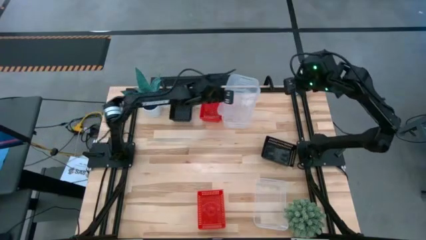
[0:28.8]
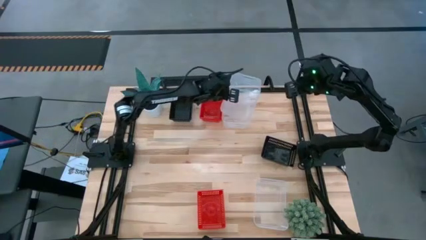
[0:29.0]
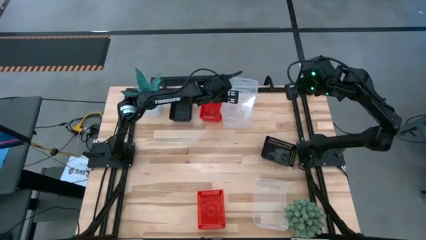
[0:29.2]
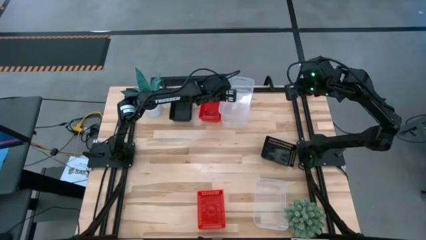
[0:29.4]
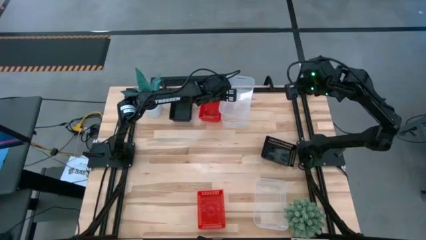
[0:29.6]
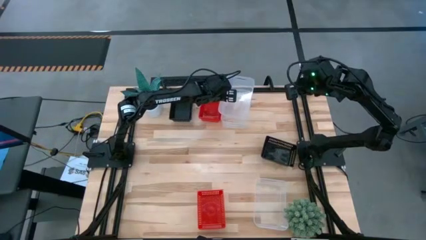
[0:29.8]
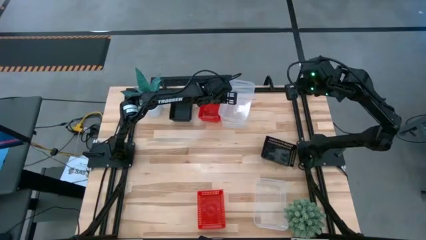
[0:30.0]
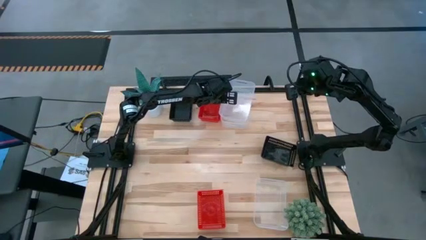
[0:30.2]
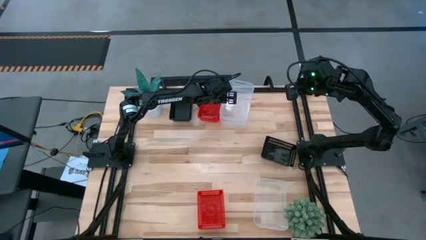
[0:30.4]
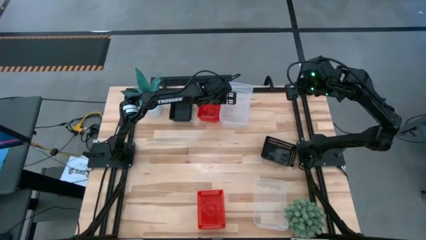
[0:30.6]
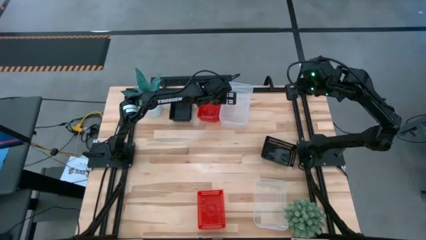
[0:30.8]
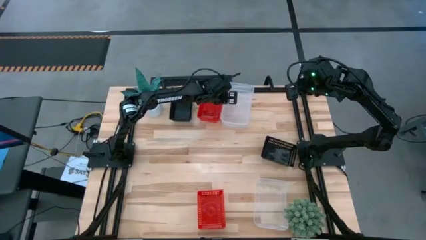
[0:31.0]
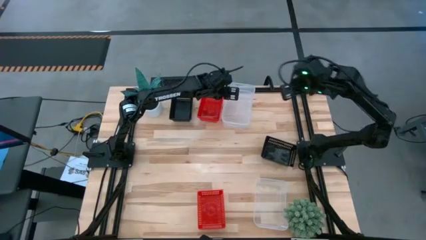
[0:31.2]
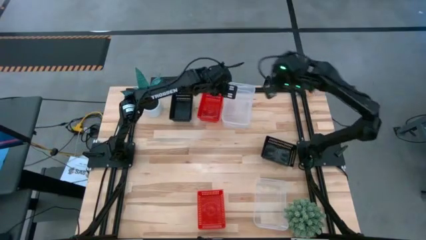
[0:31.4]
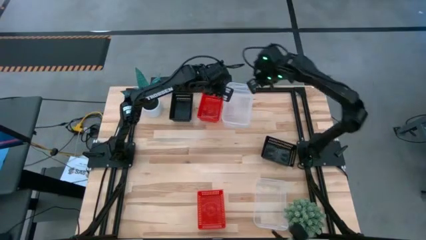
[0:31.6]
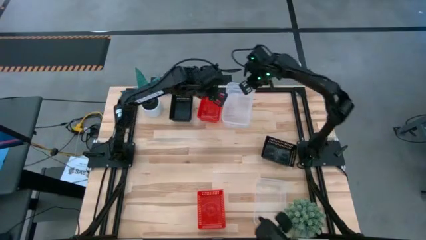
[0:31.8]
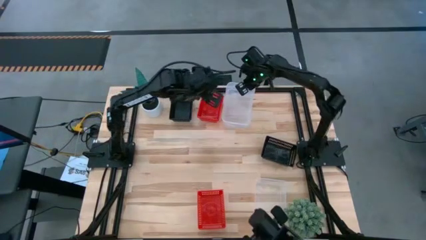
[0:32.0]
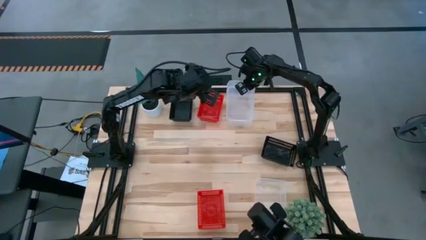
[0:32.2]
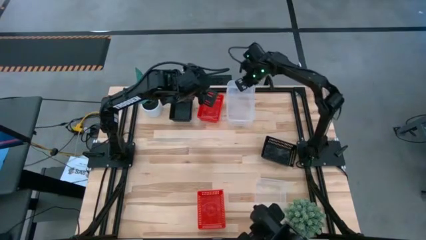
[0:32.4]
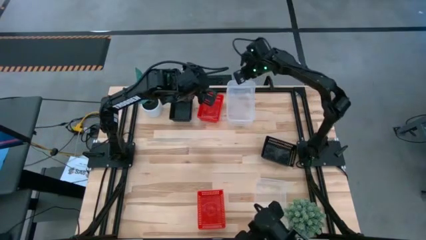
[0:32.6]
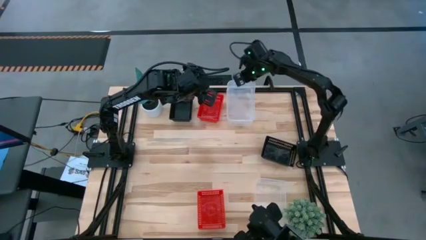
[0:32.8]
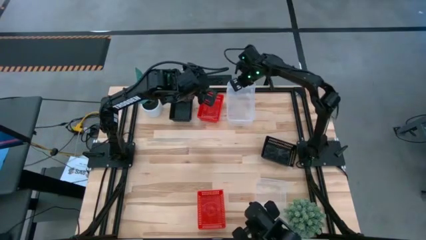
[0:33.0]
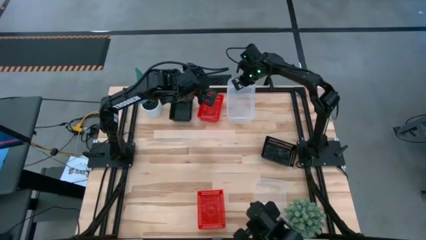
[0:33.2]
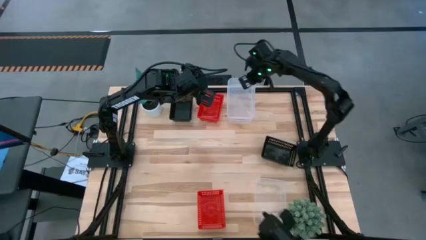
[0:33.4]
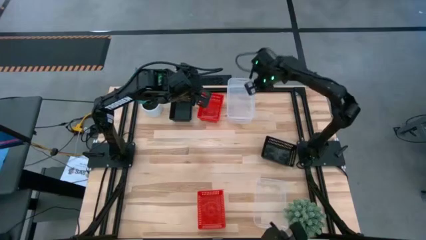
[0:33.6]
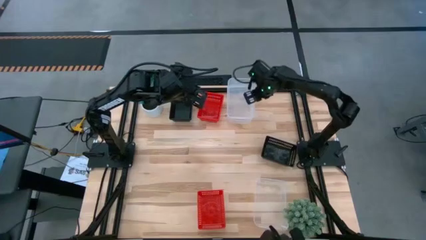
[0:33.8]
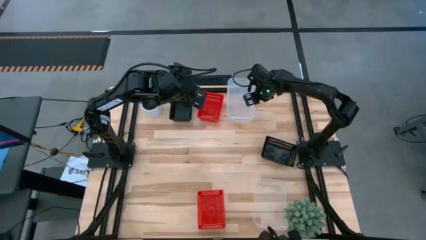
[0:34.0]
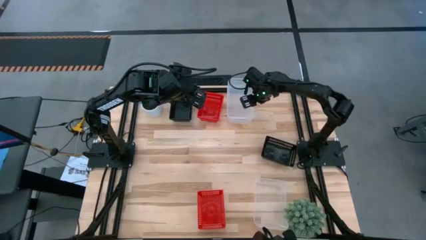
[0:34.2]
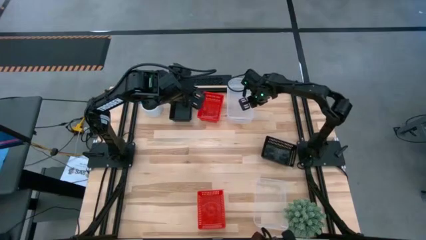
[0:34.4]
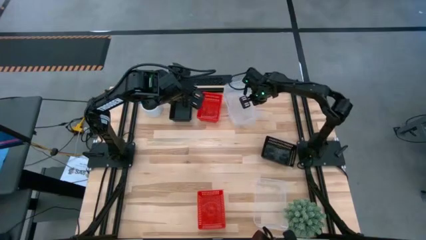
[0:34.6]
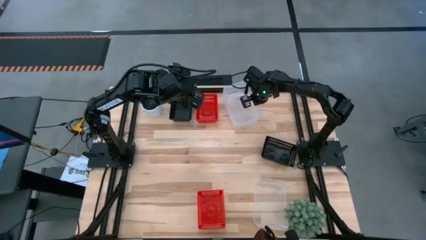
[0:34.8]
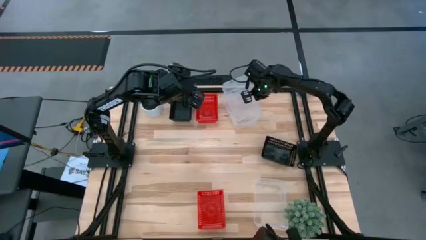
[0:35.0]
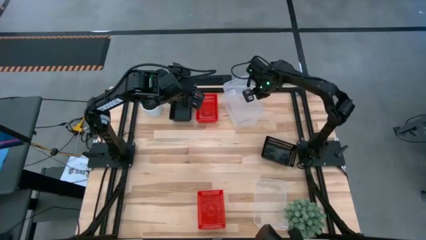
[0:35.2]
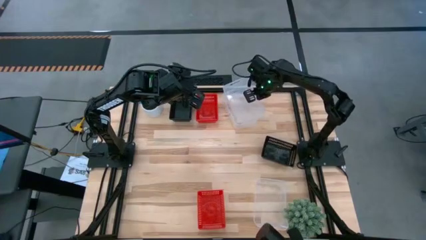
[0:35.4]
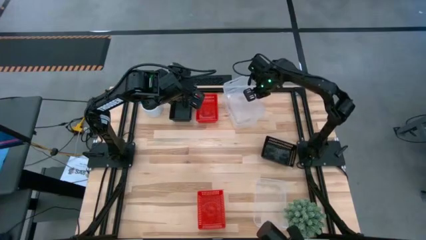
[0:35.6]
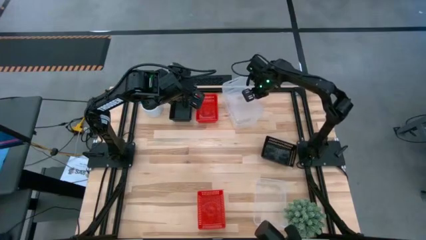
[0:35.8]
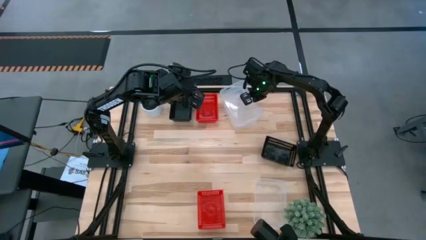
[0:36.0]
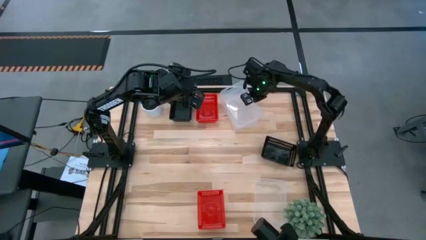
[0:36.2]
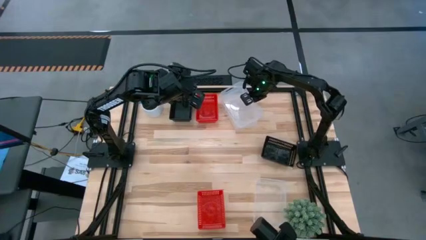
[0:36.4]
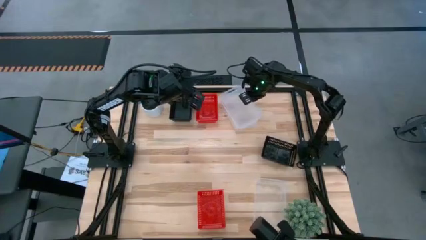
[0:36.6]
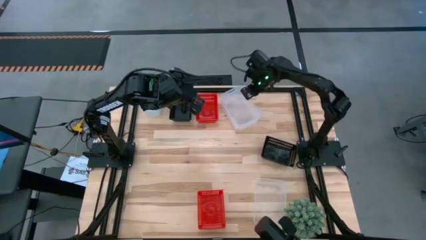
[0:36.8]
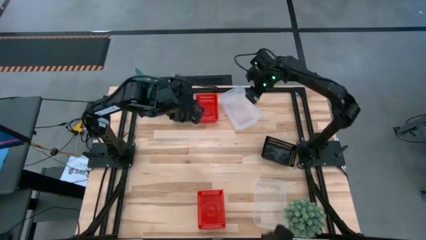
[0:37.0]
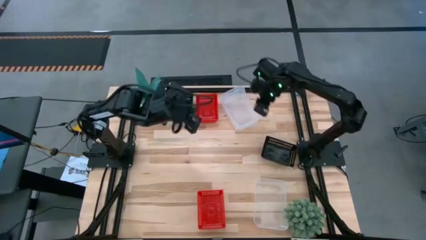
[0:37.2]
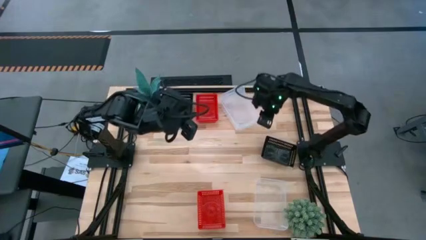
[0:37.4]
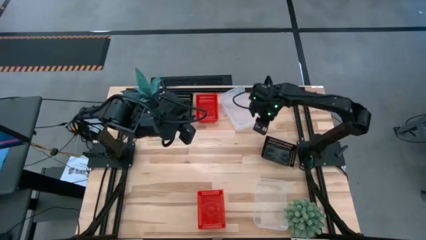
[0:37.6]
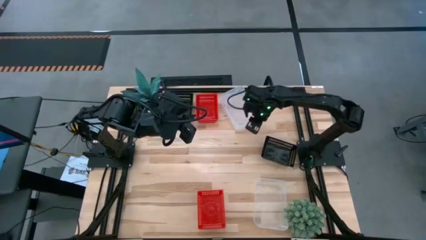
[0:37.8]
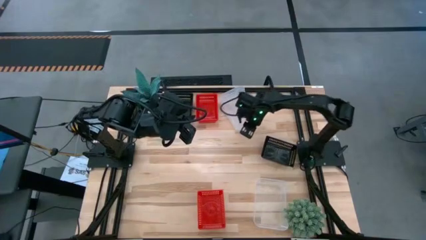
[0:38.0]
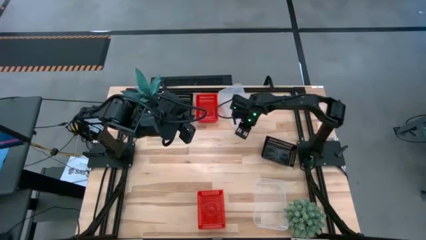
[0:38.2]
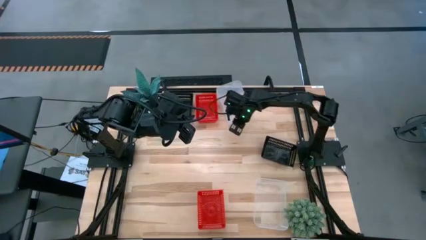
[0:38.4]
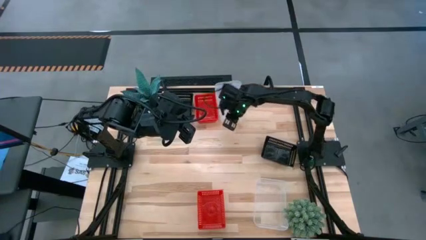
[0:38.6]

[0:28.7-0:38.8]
Stack the middle transparent bin on the top transparent bin

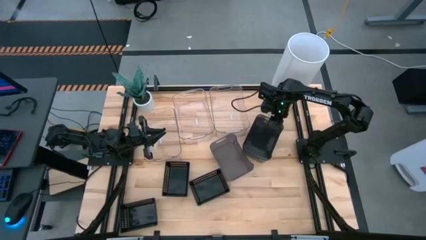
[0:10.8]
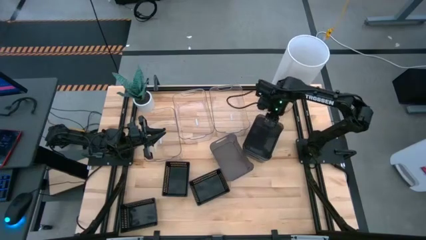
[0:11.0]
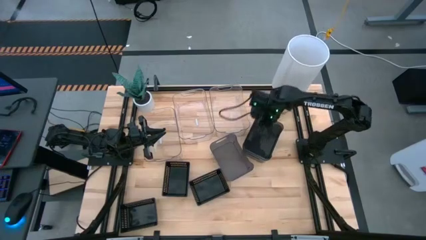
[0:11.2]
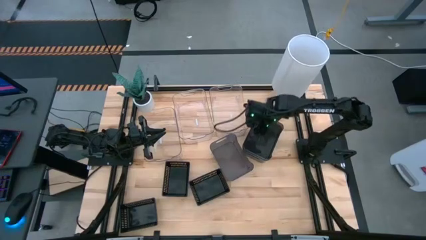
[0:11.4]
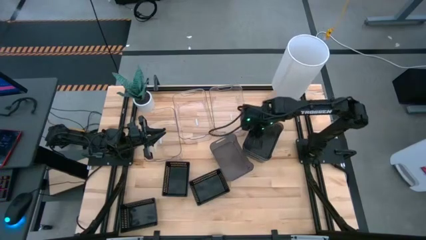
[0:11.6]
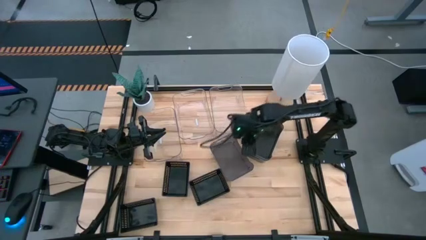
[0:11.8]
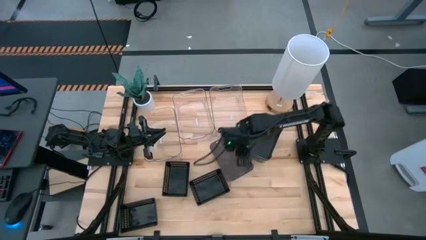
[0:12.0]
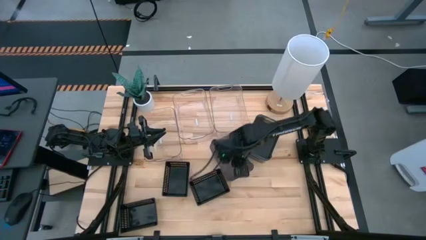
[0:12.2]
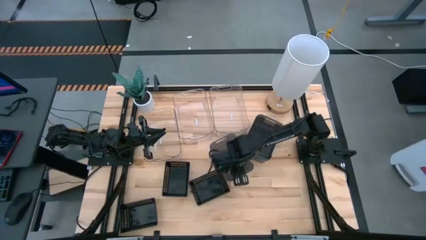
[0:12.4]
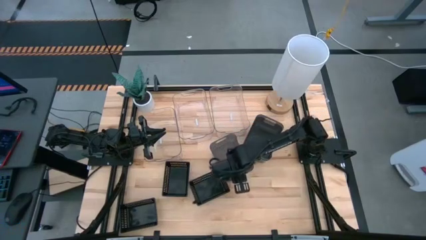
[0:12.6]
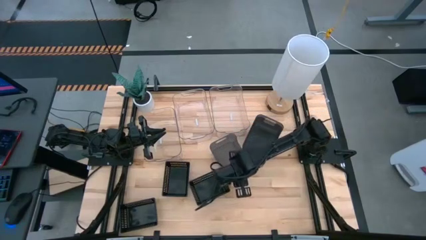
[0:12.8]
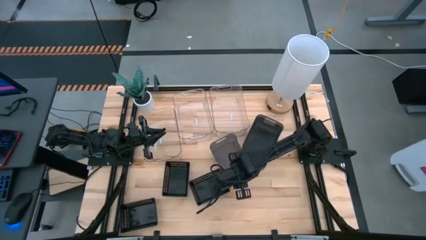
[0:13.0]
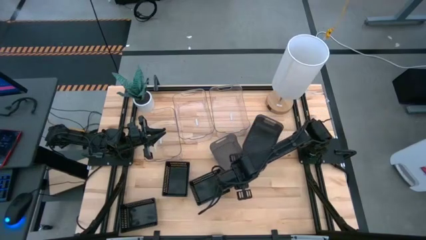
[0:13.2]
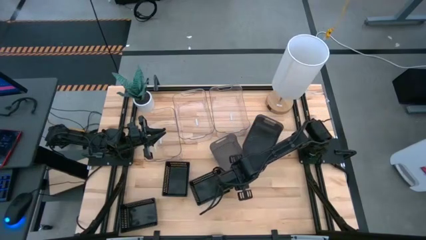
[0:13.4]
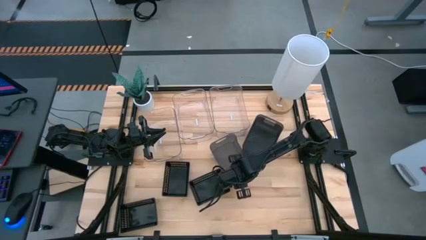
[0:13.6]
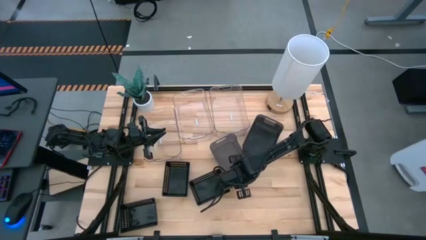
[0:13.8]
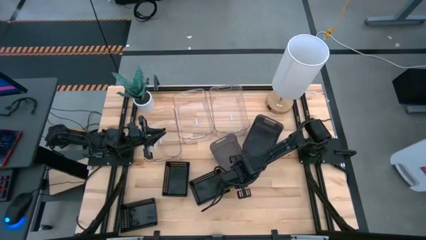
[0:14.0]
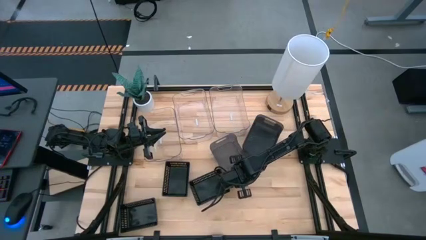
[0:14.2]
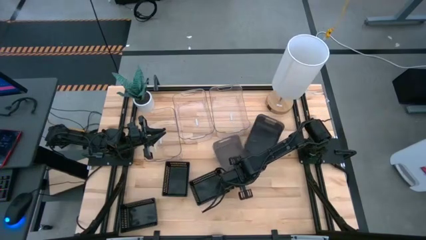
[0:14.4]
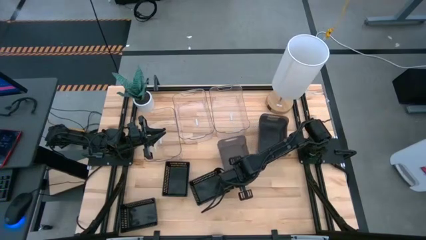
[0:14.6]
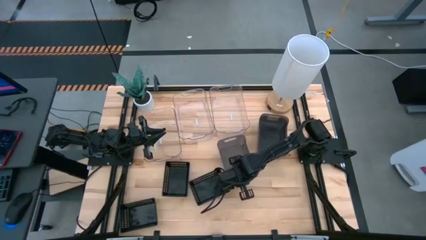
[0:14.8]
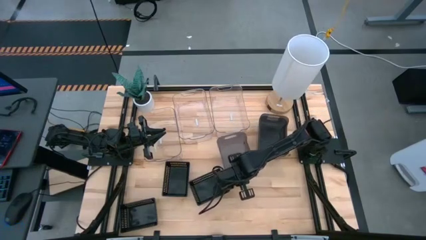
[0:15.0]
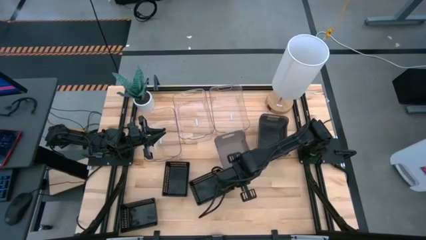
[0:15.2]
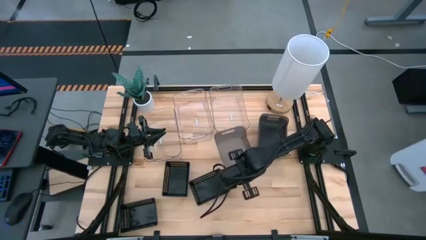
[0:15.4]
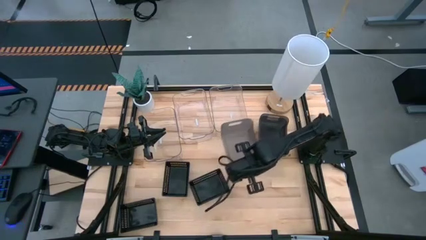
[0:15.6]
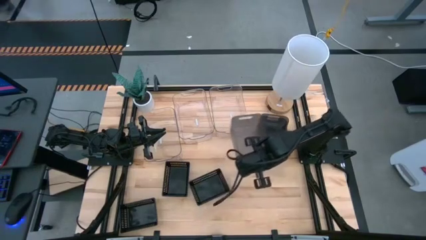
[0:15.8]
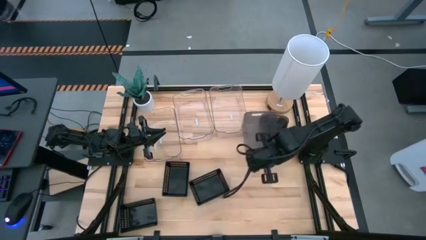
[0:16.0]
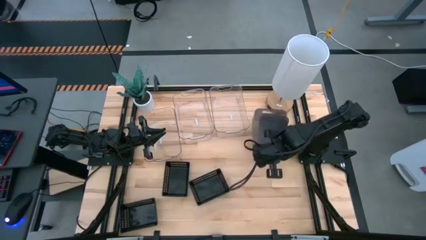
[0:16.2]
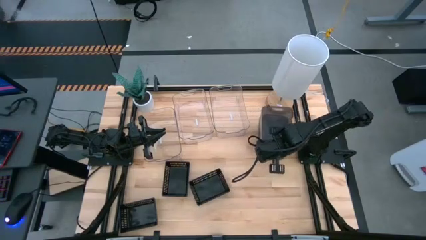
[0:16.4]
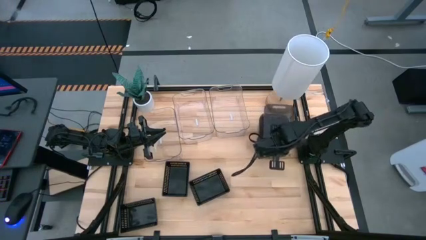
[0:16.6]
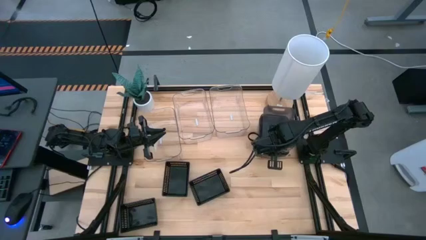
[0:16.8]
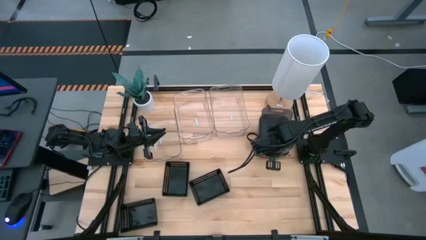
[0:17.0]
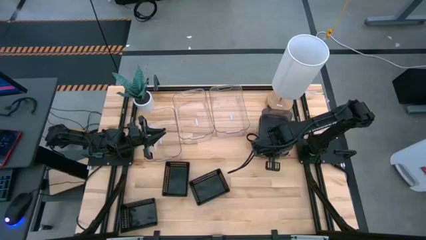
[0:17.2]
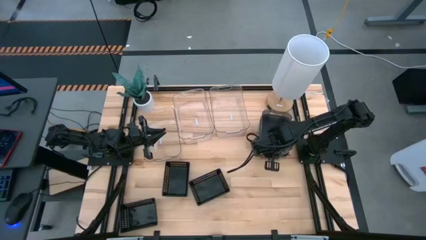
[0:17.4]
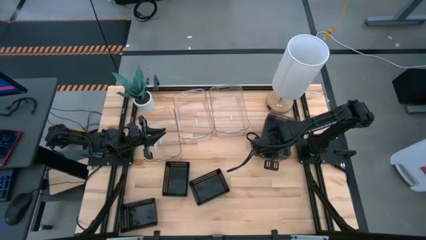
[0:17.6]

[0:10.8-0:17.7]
Stack the left black bin on the black bins
